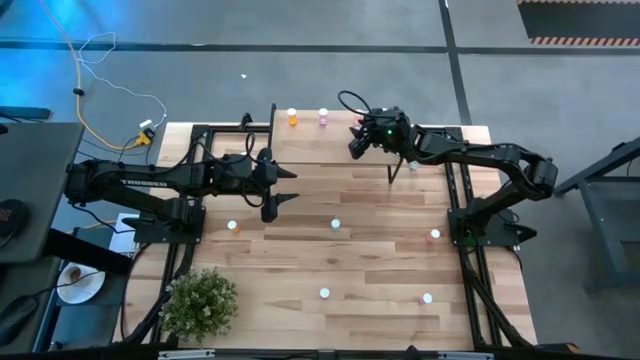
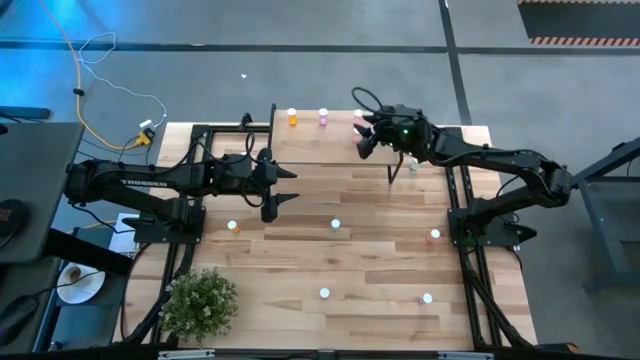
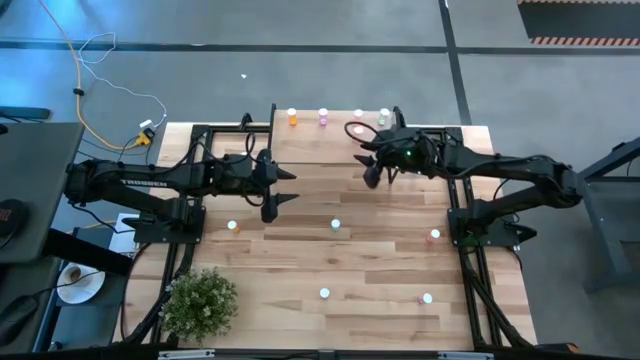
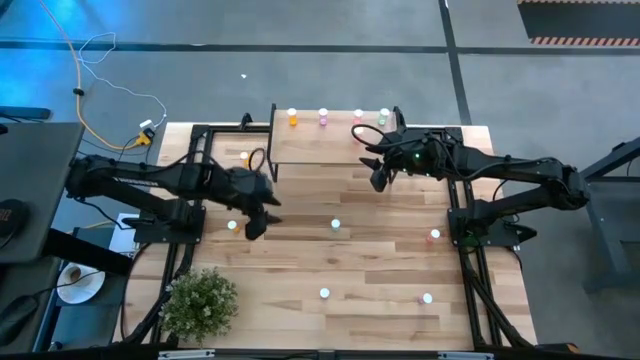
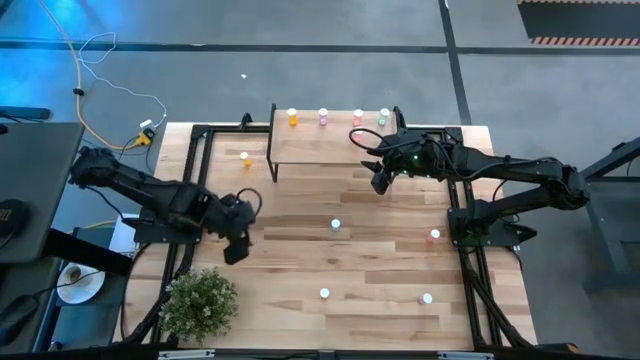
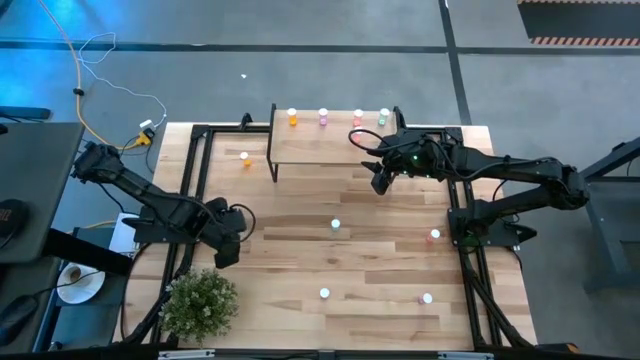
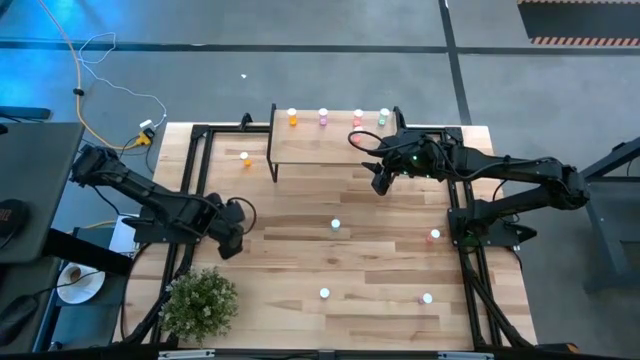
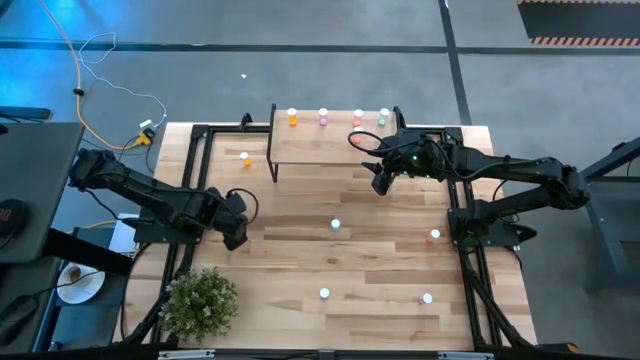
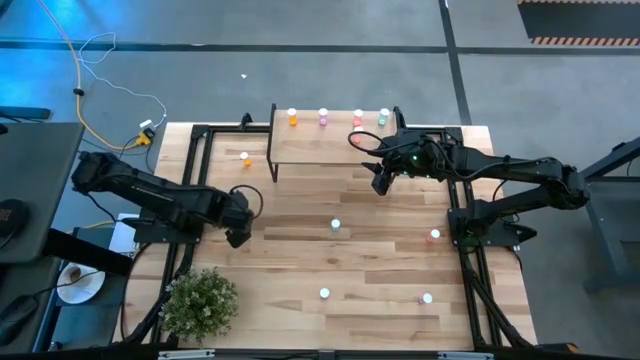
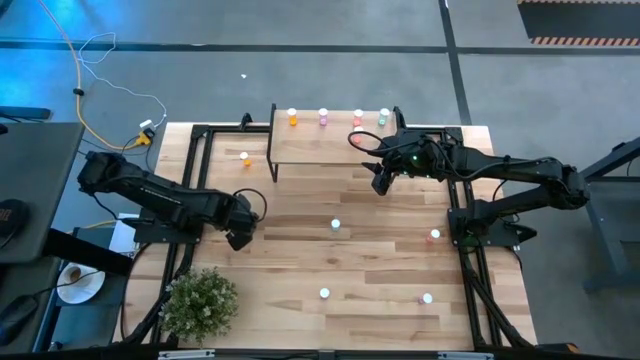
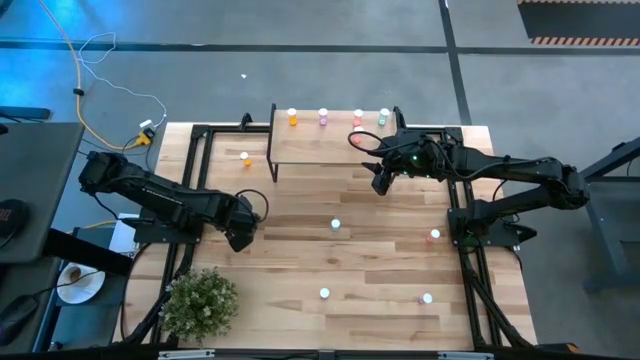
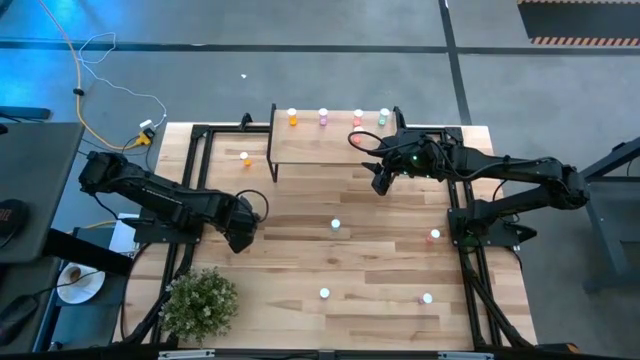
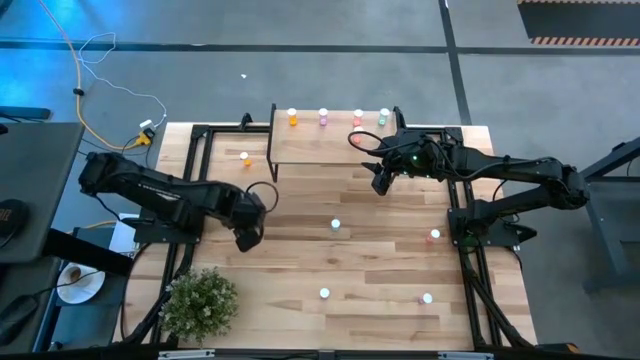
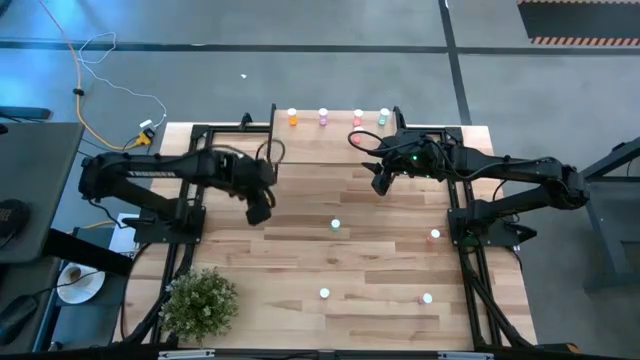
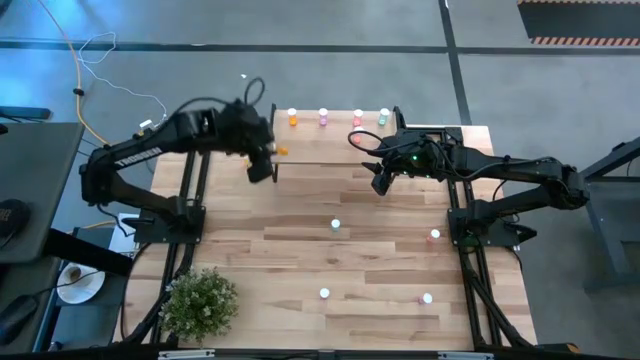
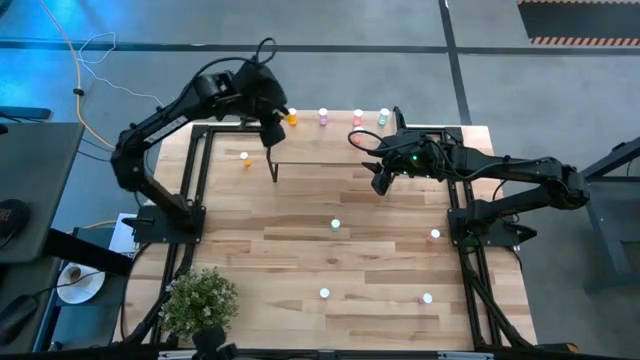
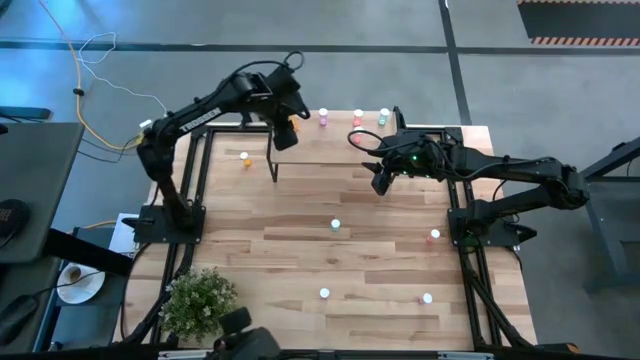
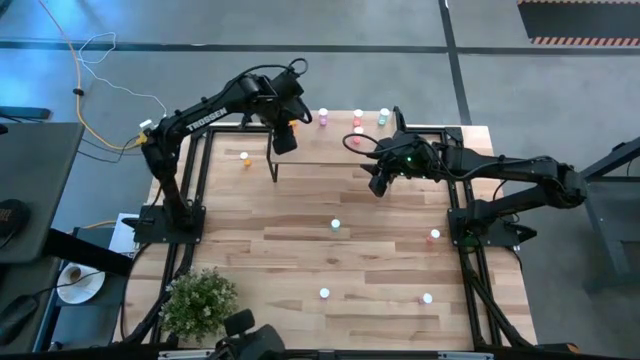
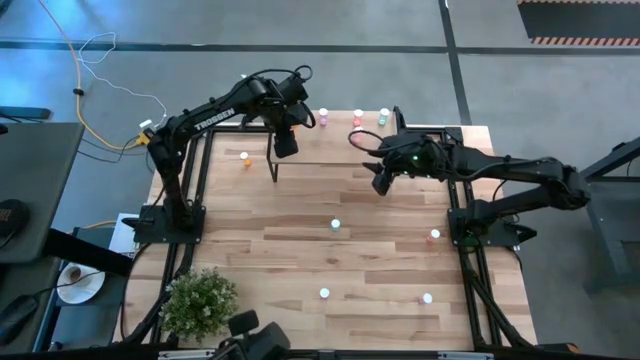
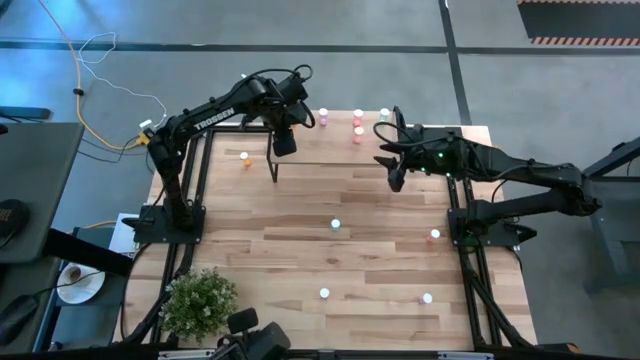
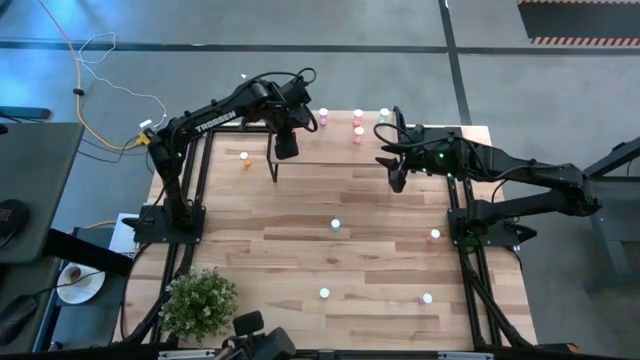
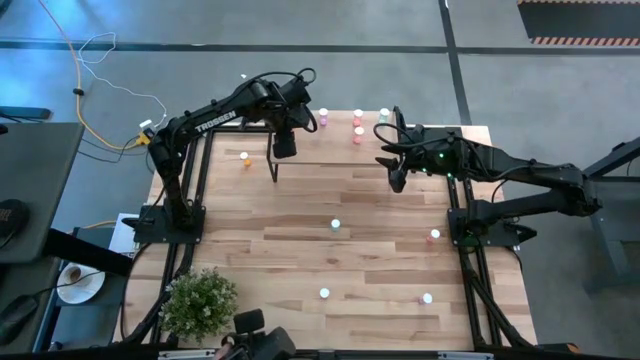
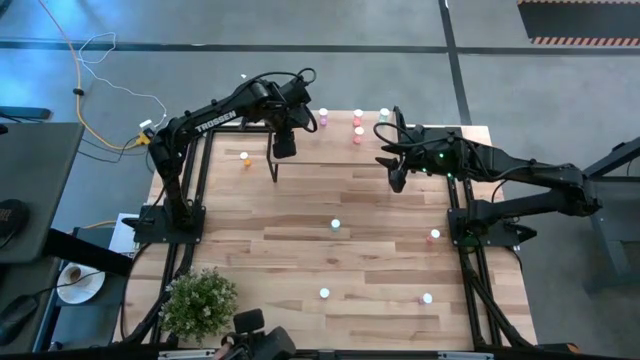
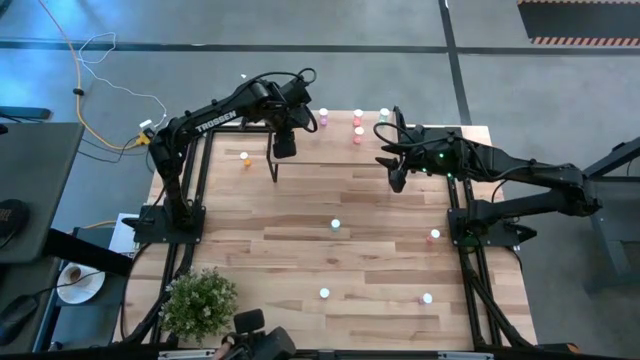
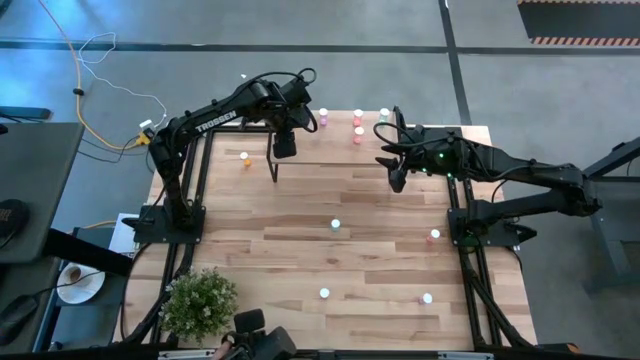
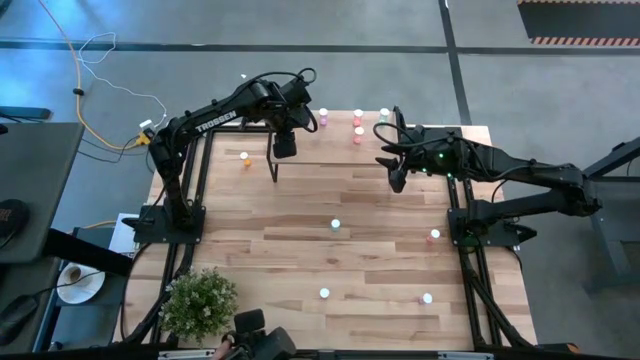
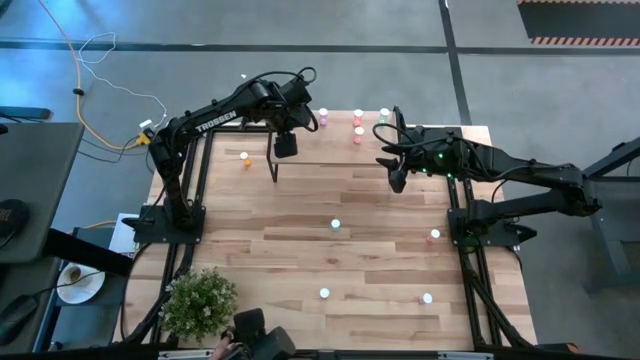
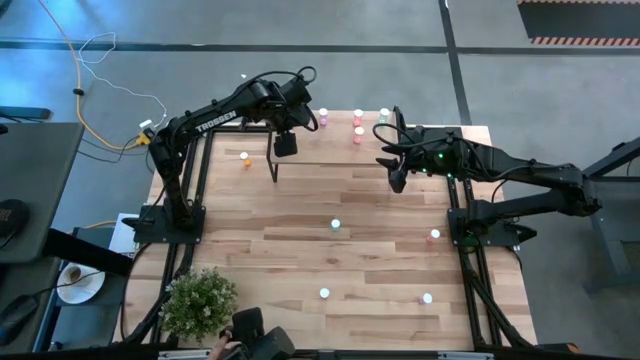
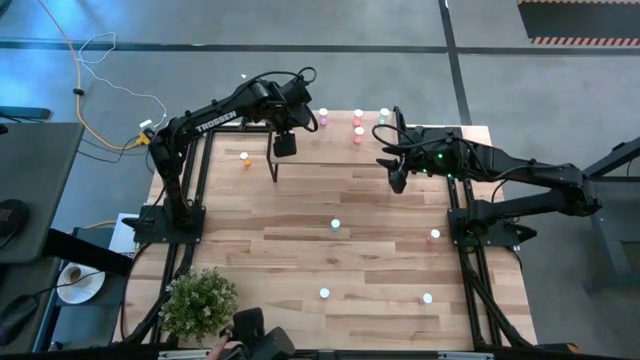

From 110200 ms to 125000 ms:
Task: Pick and place medicine bottles onto shelf by color
Put the bottom orange pill bottle on the shelf aligned with the other orange pill bottle

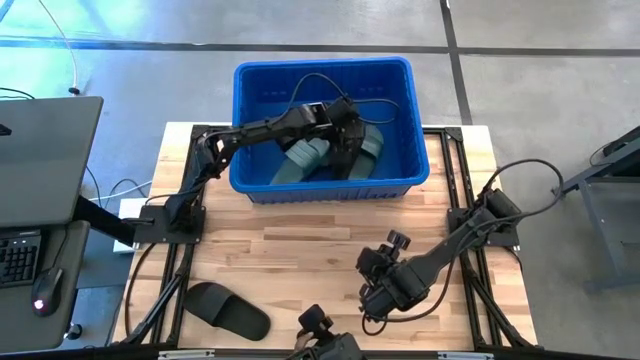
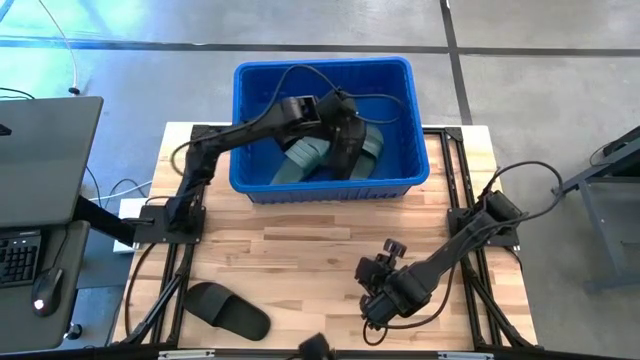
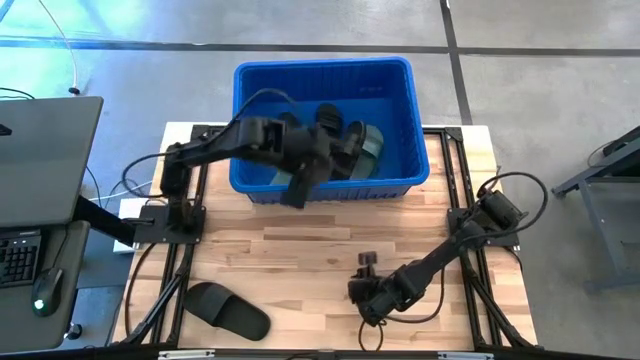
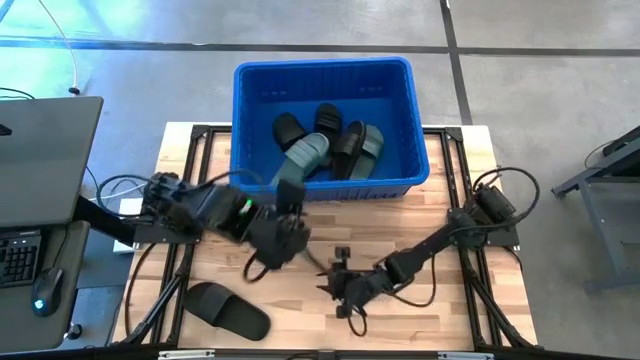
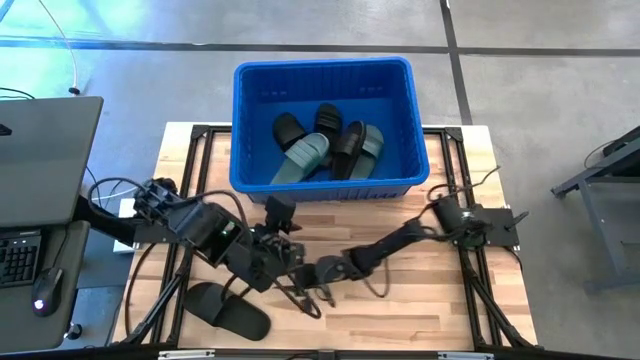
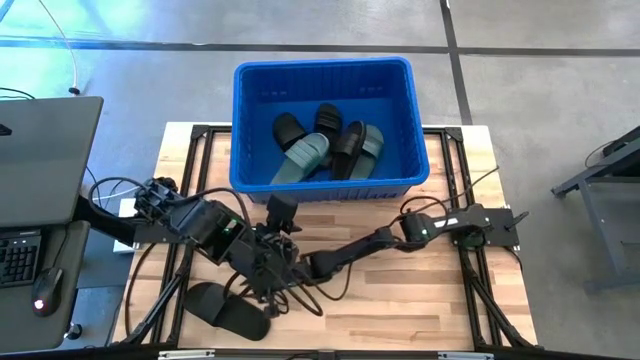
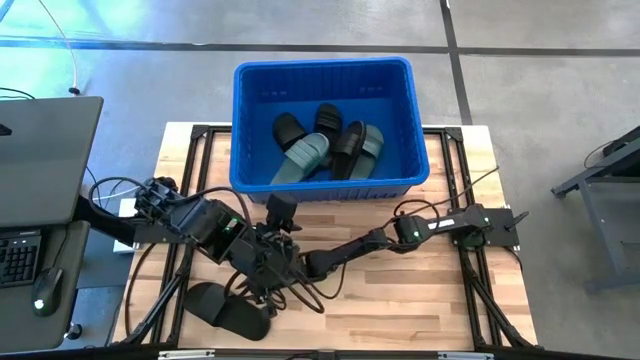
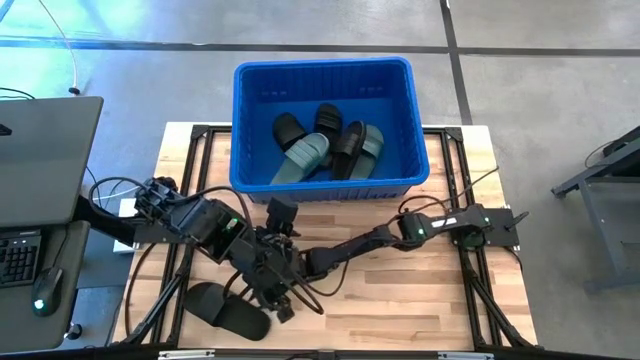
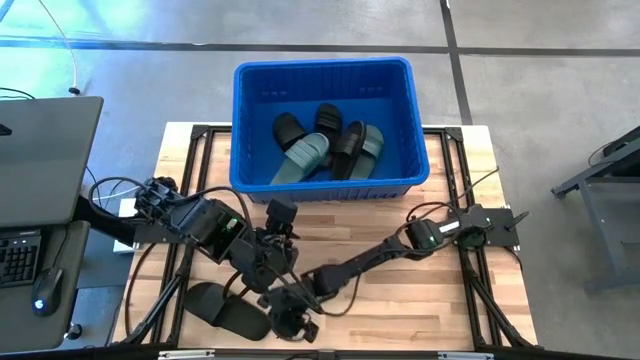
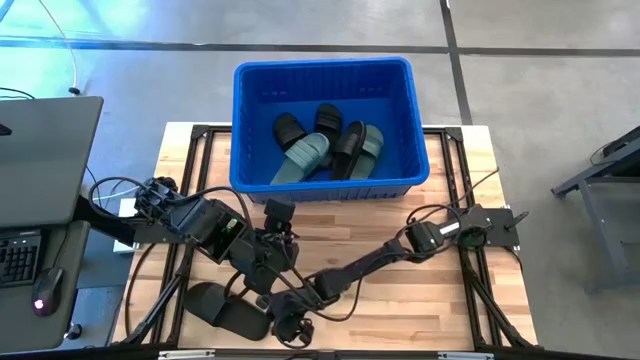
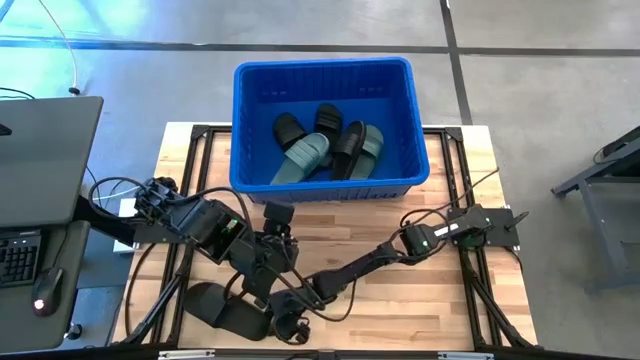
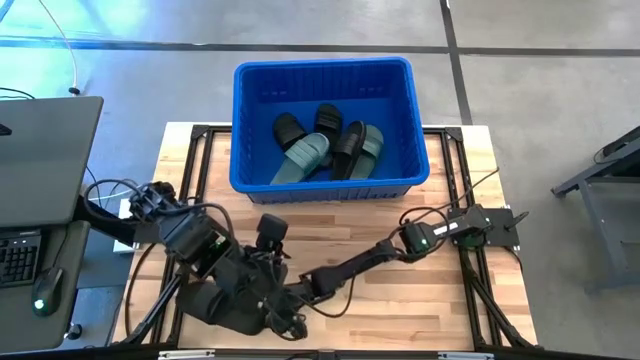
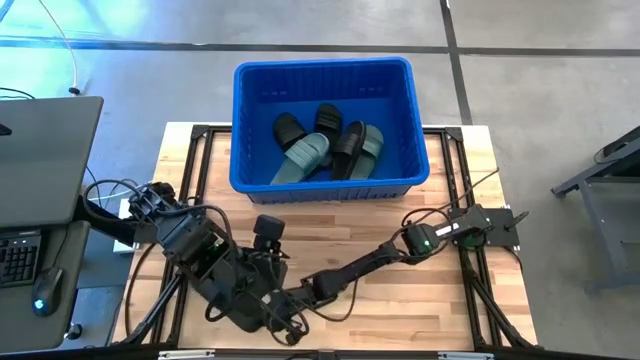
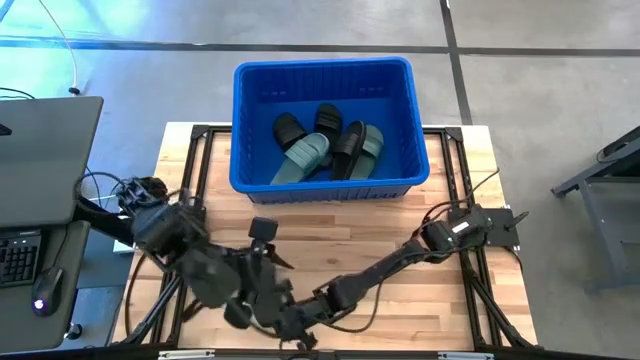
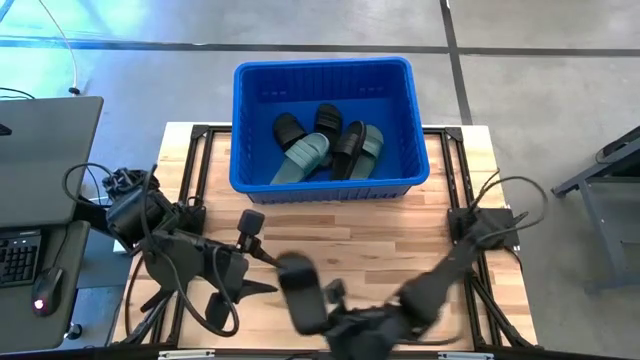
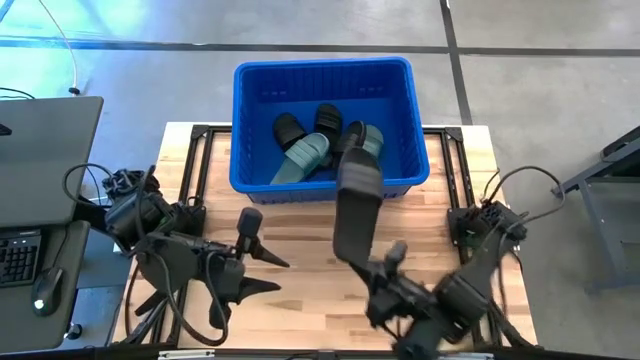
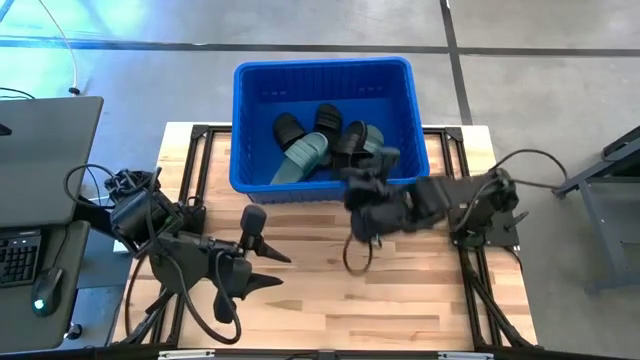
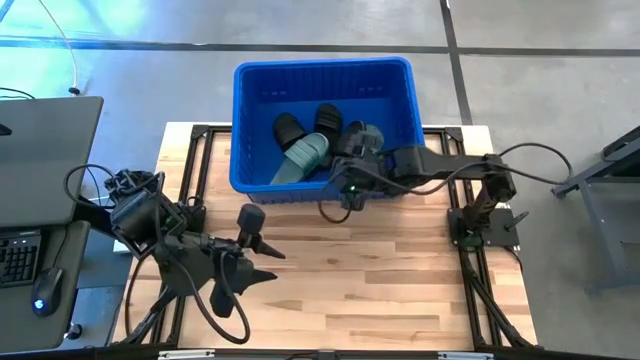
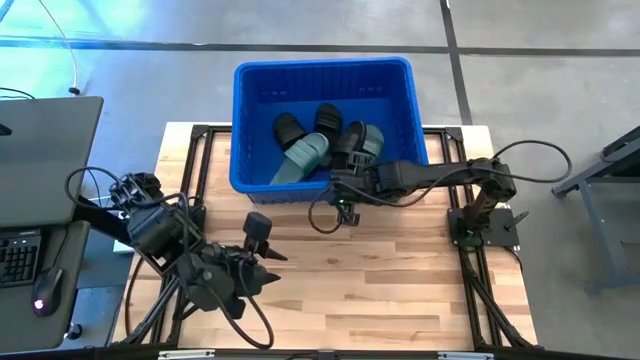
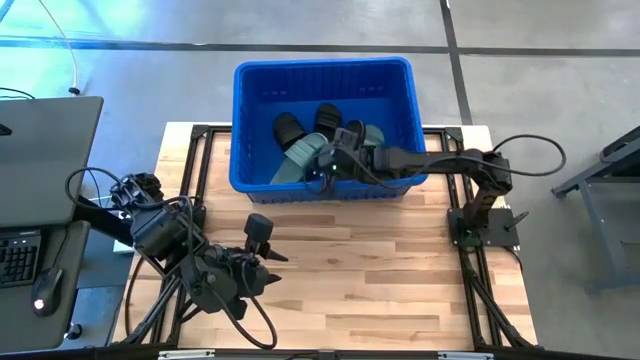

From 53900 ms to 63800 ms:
Task: Pick and place slides into bin
Put the black slide into the blue bin
